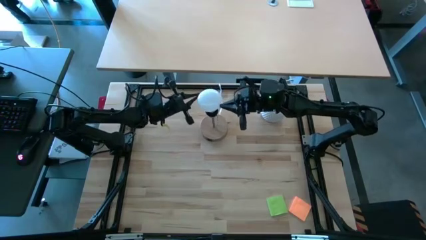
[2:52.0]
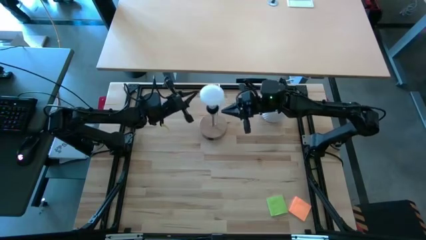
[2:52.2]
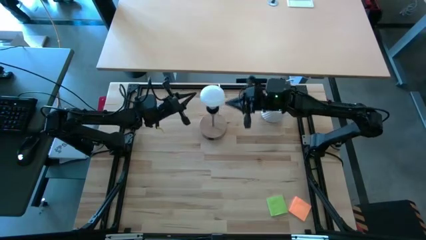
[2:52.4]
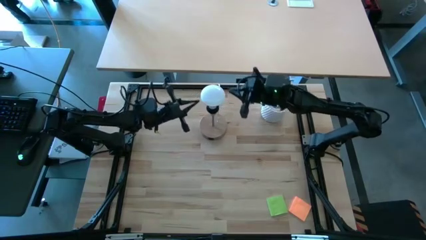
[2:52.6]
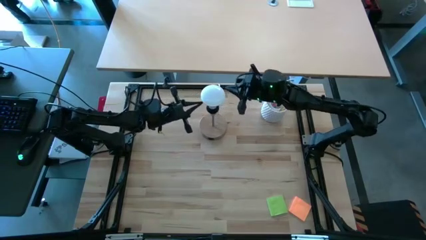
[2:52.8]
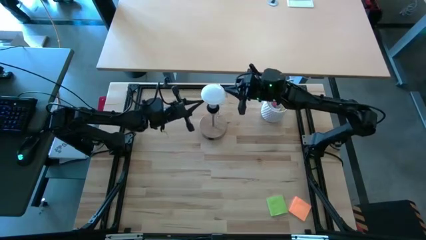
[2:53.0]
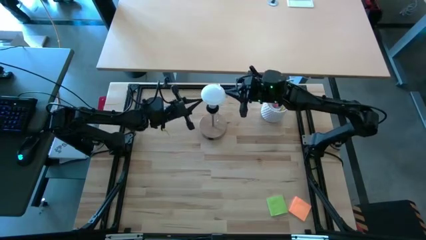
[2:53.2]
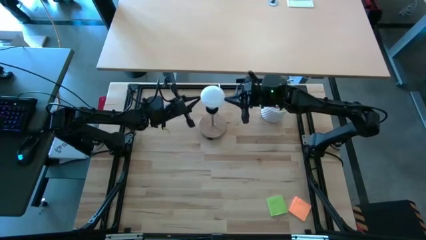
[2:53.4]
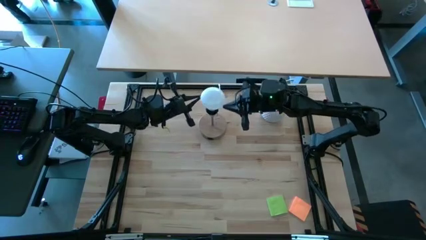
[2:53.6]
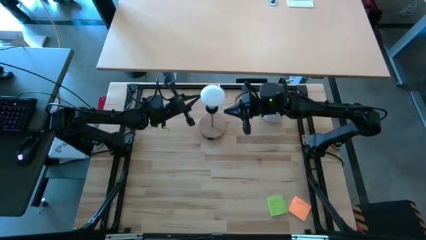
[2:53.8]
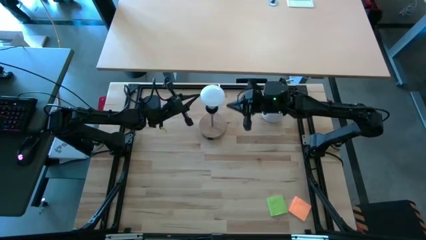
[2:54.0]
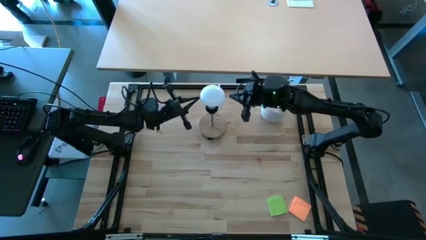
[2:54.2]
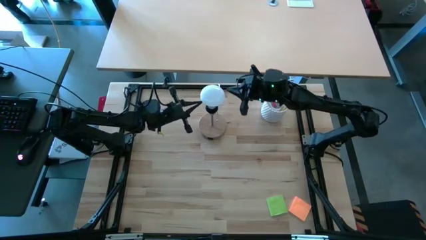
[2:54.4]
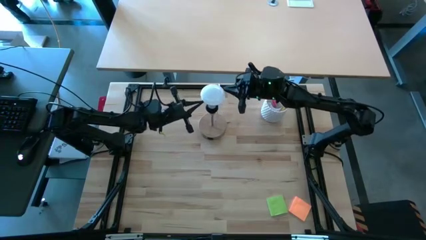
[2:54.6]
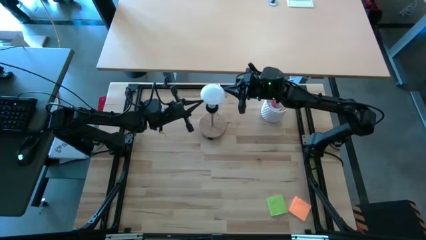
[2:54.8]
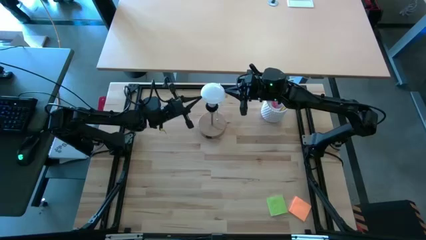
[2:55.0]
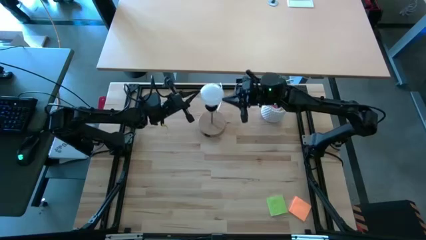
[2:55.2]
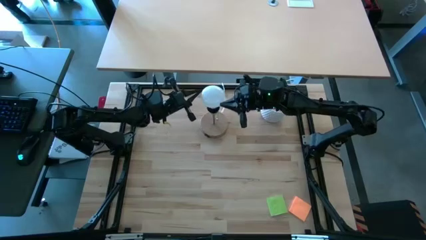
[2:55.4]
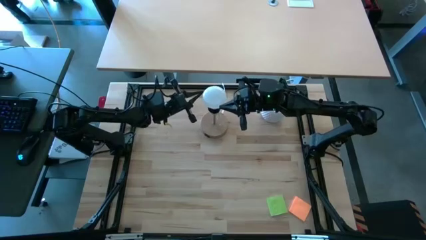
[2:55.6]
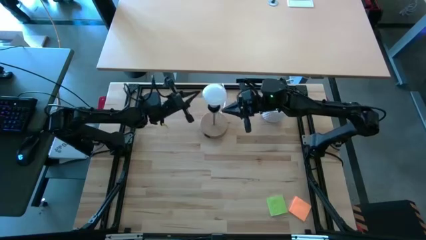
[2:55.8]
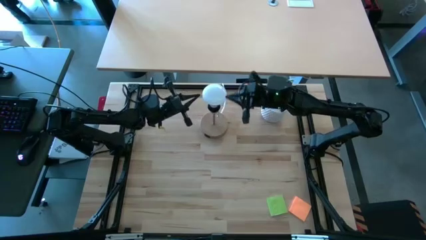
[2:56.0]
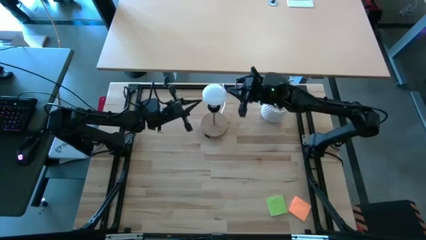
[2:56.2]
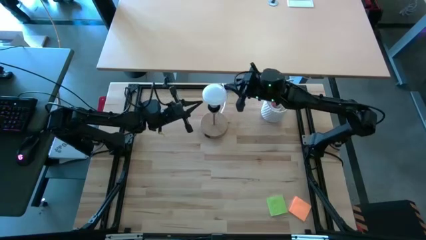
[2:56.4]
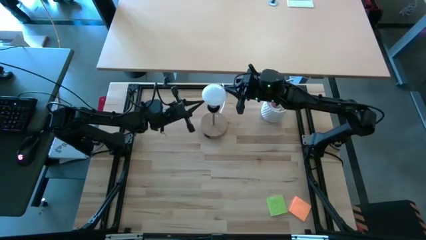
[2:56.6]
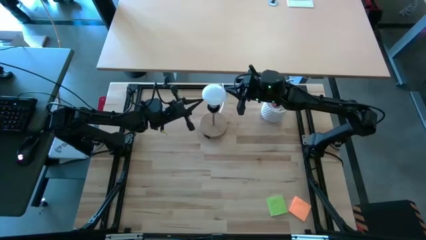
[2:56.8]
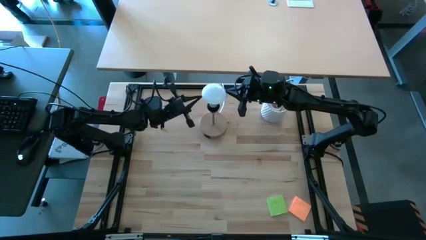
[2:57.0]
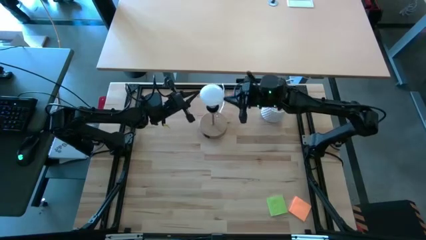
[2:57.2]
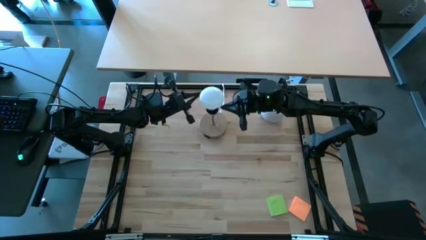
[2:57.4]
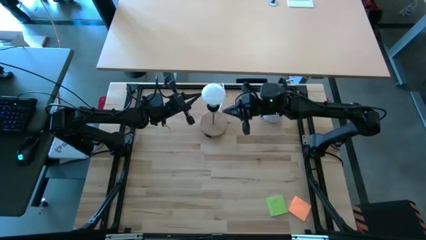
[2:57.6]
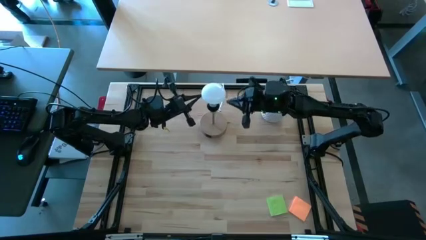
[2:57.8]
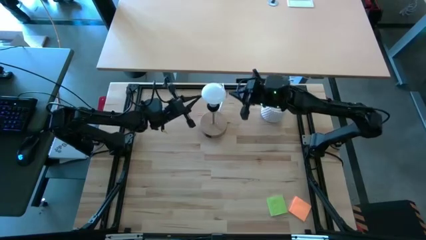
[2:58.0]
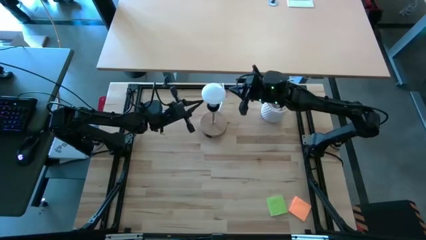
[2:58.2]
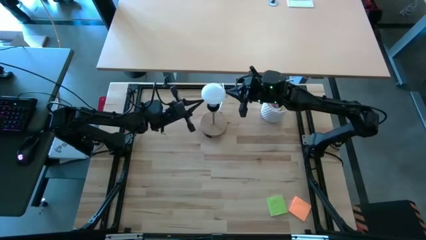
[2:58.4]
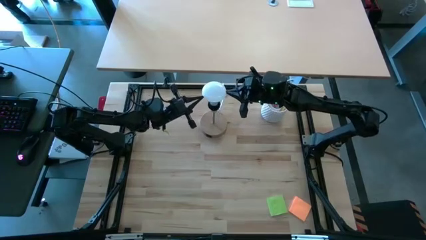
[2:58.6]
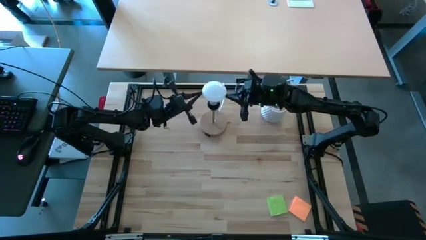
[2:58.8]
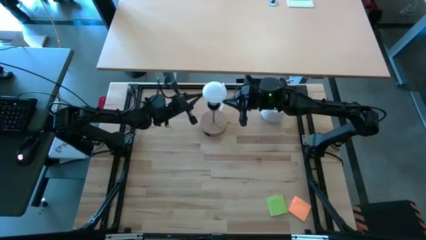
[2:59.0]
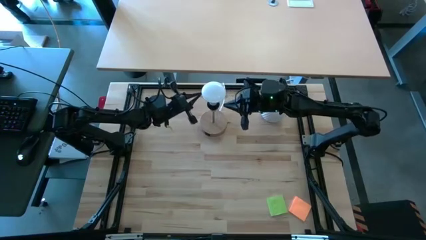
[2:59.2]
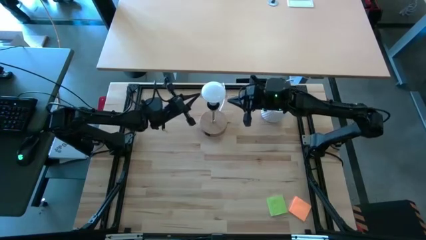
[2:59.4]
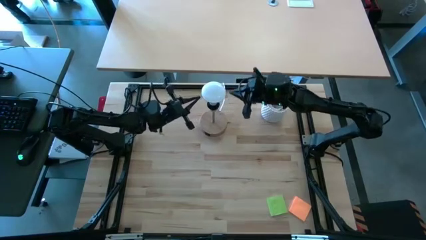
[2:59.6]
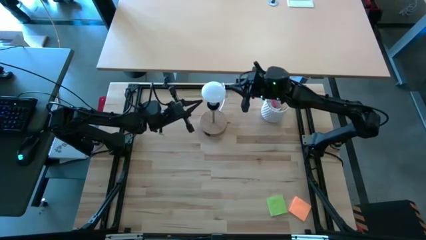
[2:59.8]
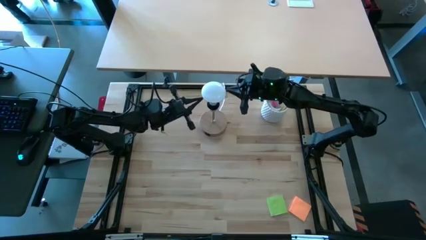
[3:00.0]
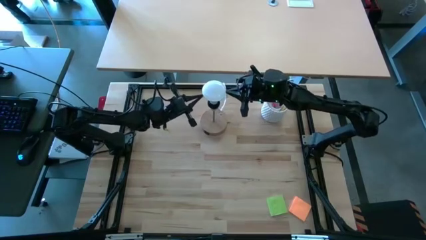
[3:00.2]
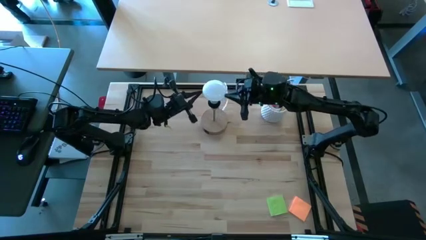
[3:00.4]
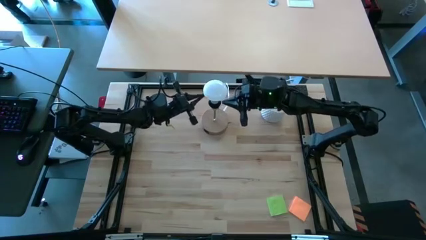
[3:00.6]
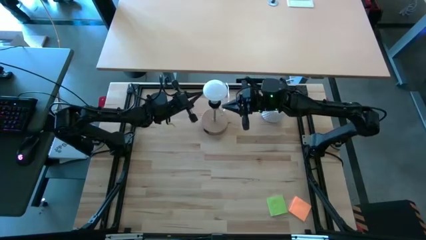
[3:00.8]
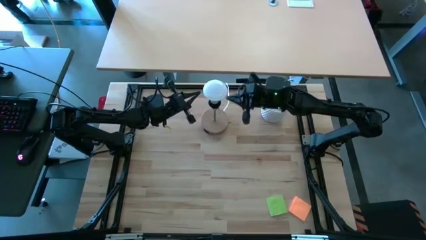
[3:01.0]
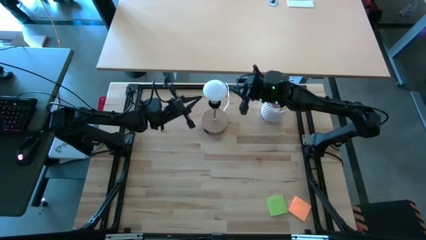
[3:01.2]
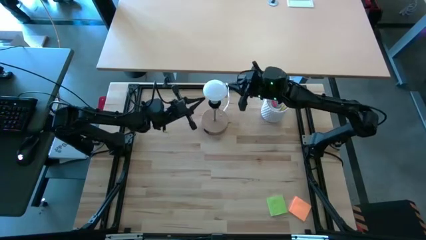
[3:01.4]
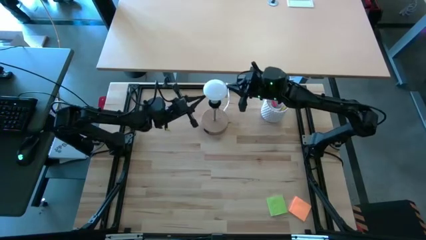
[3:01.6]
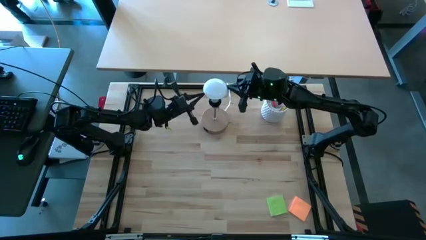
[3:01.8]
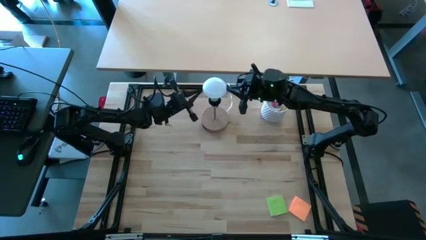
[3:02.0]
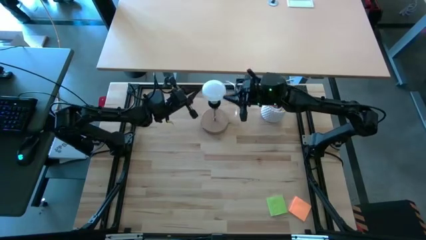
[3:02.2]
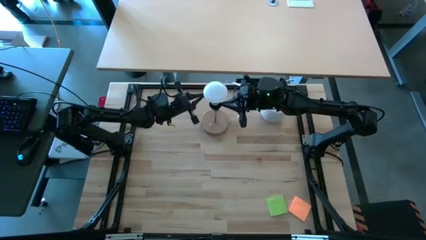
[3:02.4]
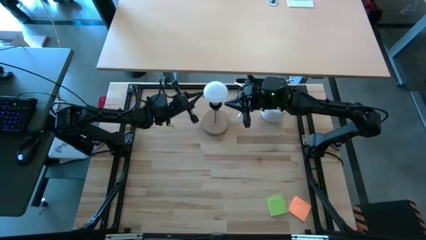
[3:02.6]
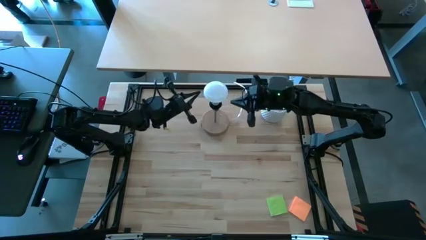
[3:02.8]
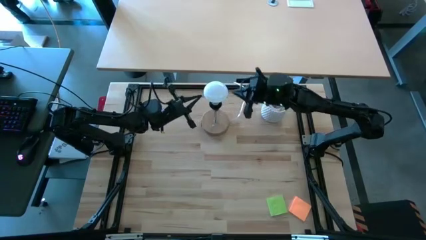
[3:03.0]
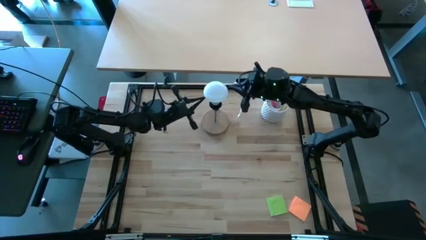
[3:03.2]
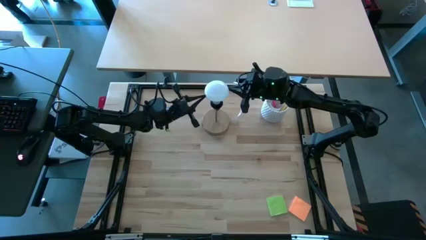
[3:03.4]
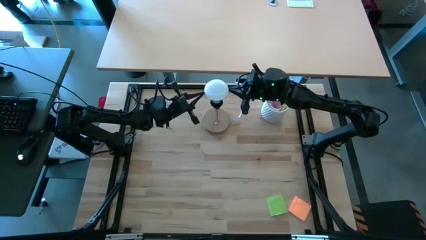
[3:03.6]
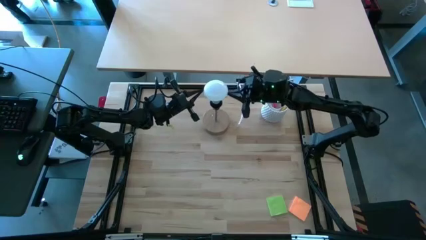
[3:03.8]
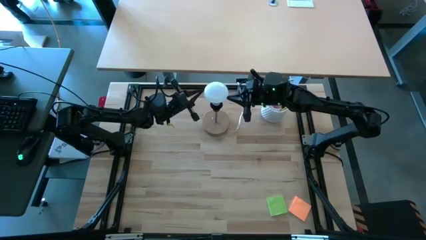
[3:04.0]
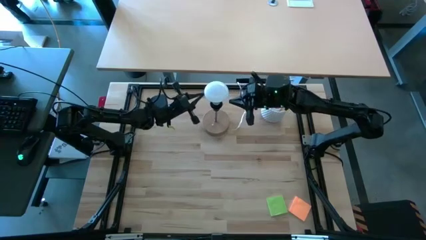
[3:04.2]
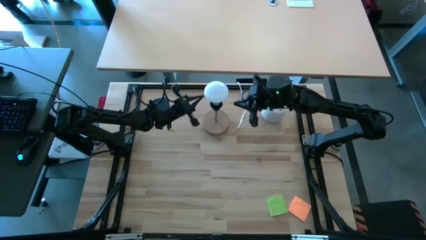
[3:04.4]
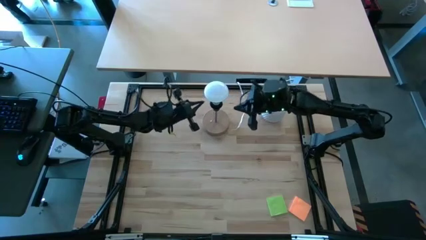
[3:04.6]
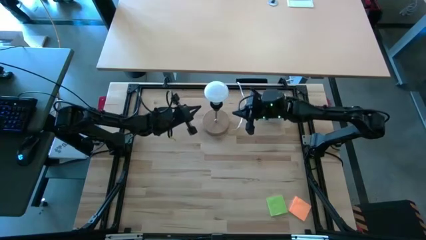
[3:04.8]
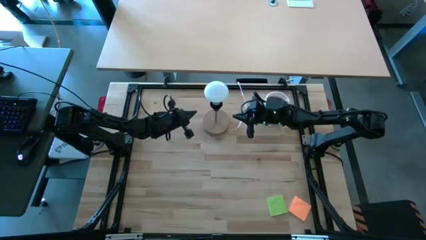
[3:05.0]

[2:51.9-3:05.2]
Task: Screw lightbulb
Insert the lightbulb into the lamp

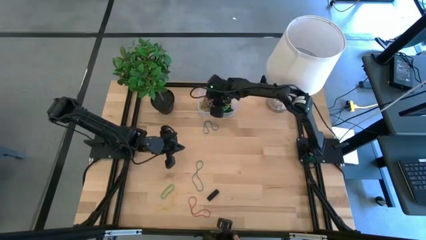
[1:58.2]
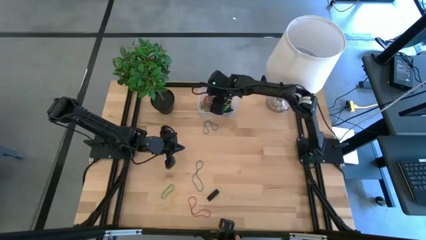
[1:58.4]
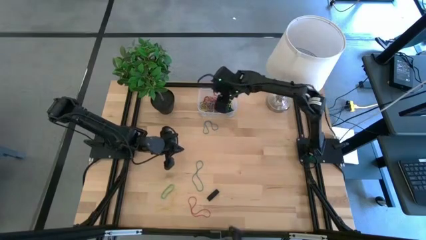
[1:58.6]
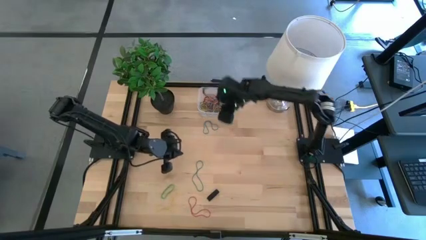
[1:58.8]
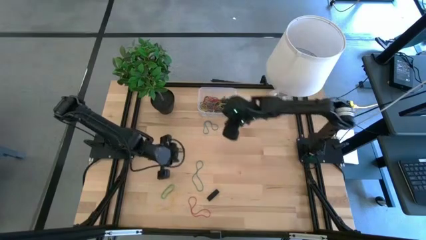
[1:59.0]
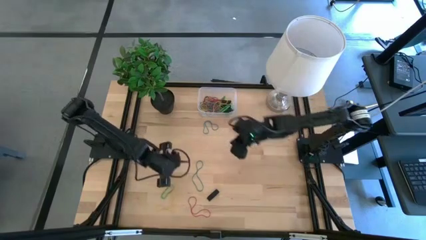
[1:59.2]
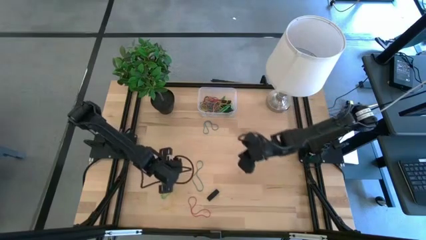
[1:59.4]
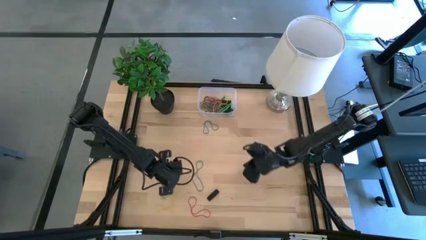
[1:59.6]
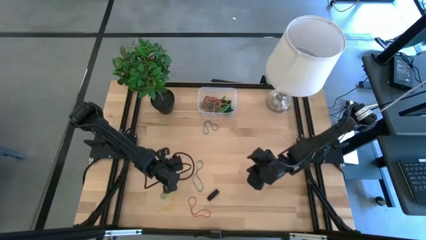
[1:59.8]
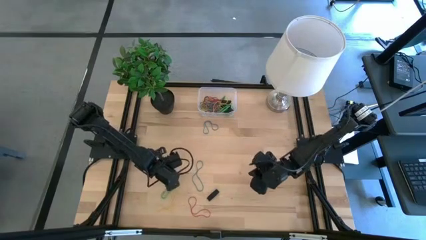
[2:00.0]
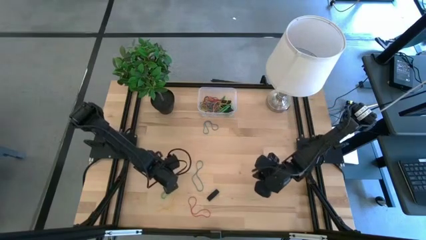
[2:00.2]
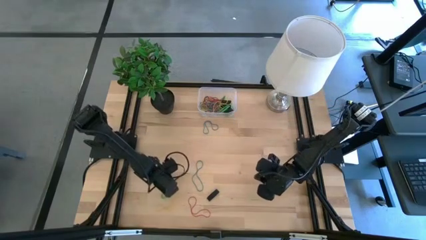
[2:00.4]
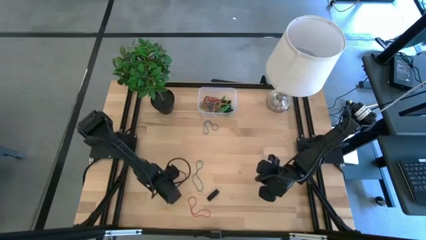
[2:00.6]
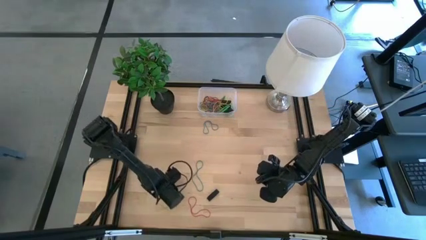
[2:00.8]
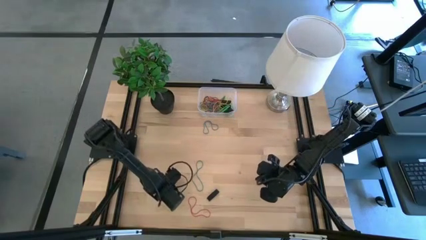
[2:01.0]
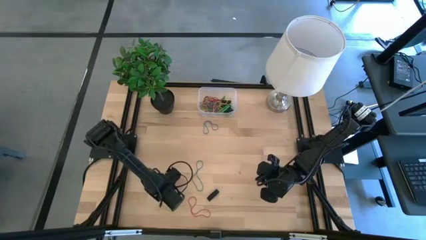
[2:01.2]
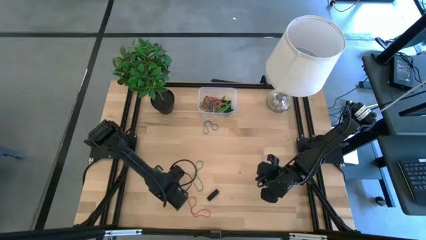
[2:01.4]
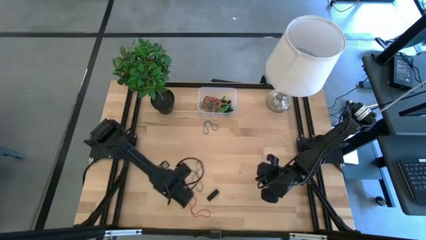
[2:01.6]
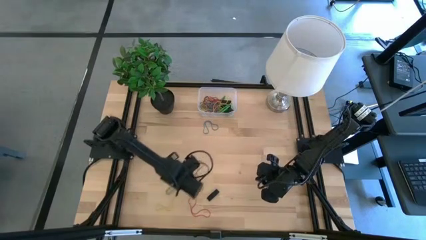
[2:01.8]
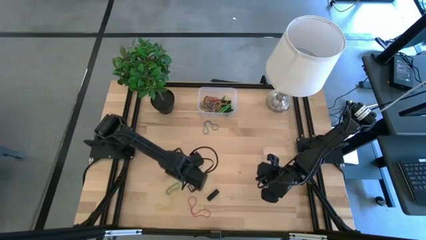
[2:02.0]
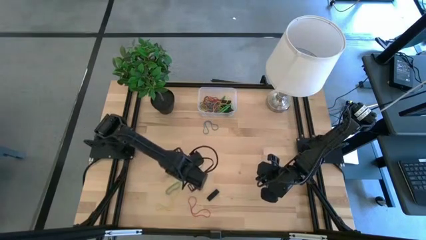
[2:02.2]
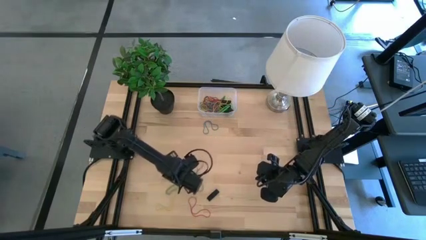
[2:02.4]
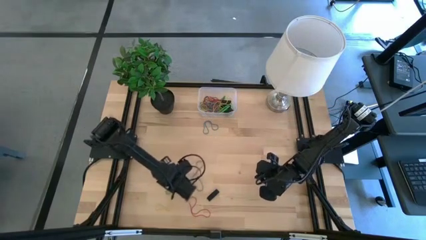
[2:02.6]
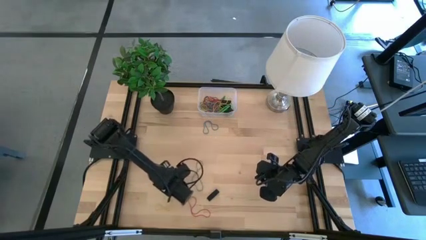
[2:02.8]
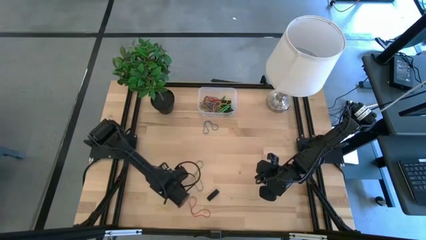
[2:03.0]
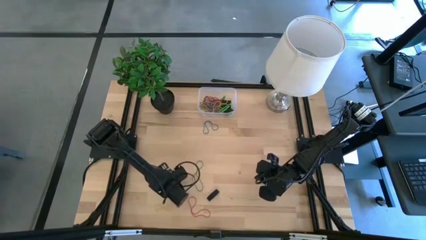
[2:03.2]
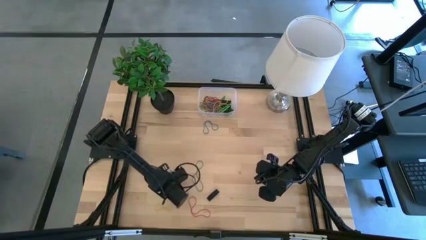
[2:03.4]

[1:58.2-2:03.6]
Task: Pick and place rubber bands into bin
Put the green rubber band into the transparent bin
